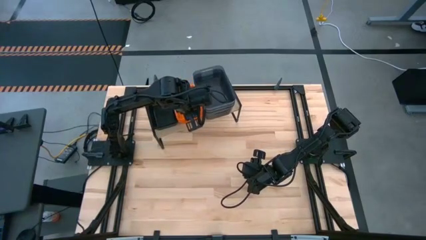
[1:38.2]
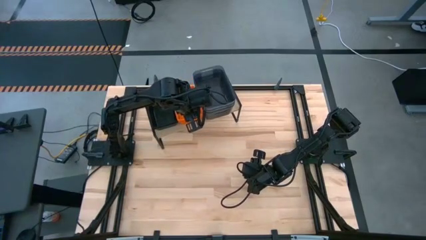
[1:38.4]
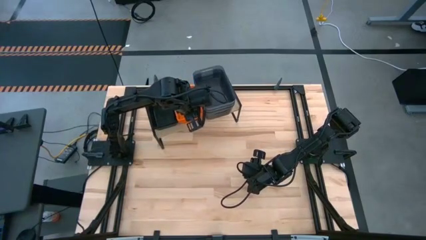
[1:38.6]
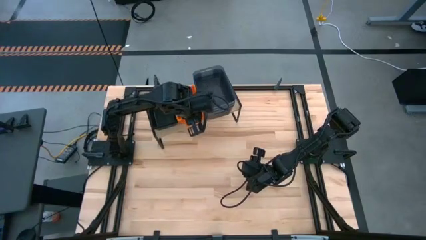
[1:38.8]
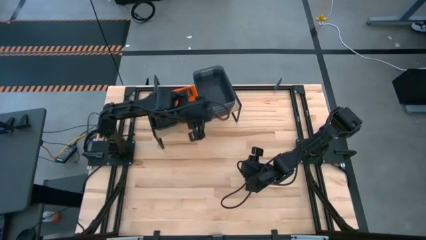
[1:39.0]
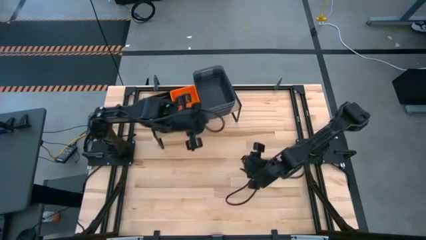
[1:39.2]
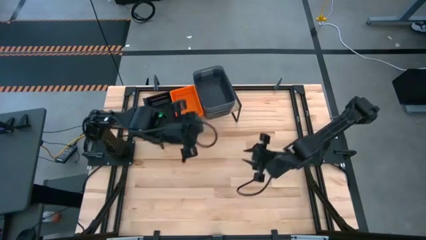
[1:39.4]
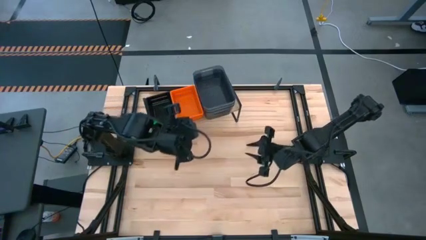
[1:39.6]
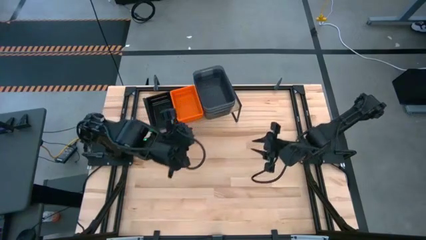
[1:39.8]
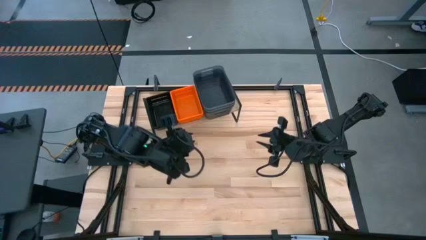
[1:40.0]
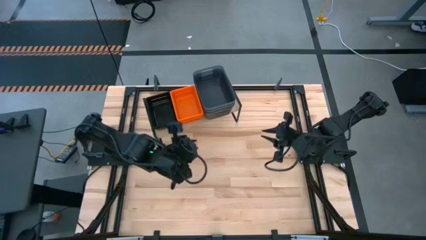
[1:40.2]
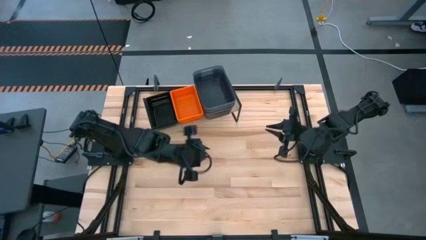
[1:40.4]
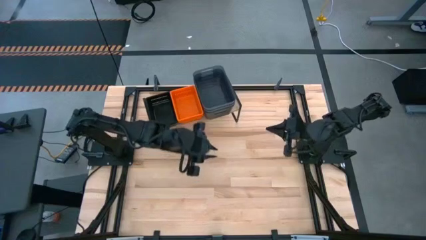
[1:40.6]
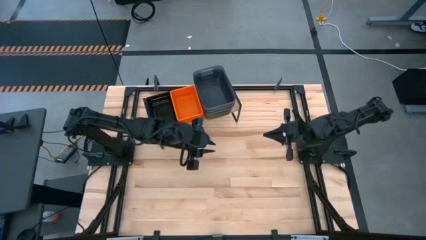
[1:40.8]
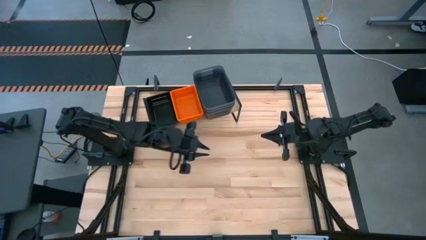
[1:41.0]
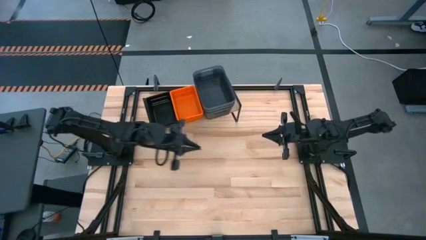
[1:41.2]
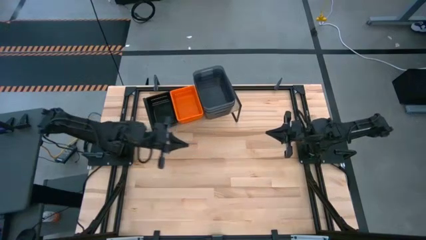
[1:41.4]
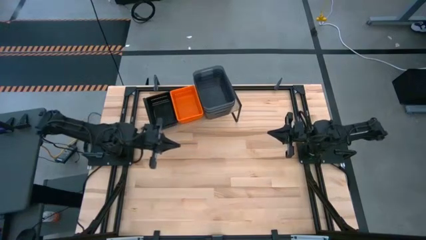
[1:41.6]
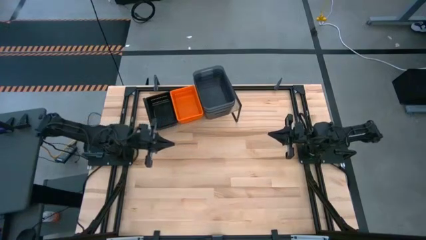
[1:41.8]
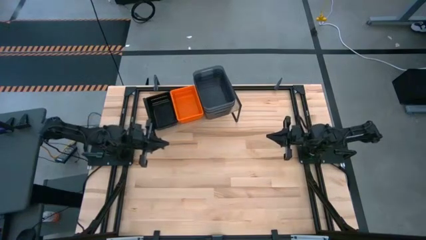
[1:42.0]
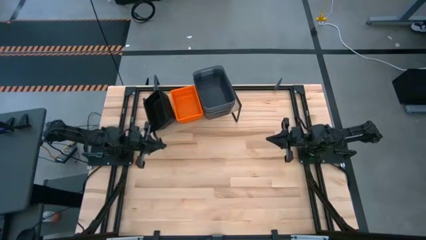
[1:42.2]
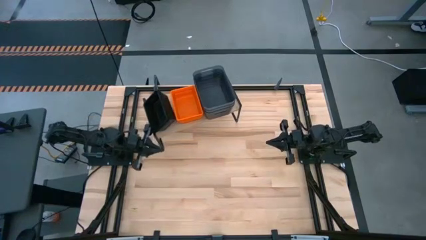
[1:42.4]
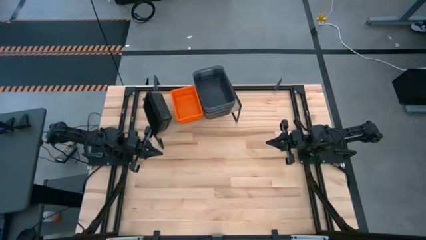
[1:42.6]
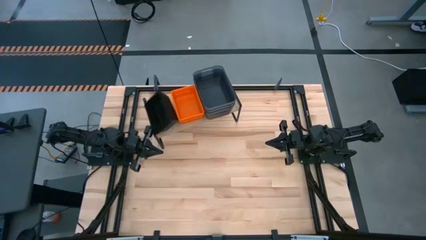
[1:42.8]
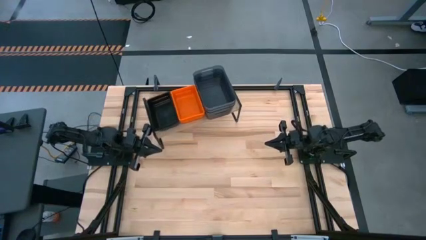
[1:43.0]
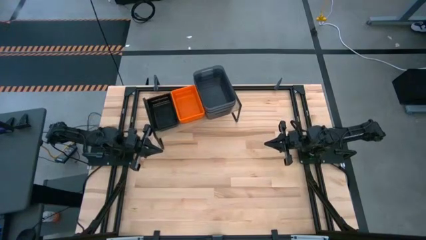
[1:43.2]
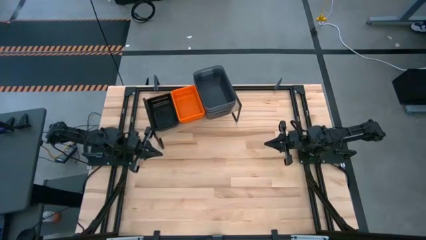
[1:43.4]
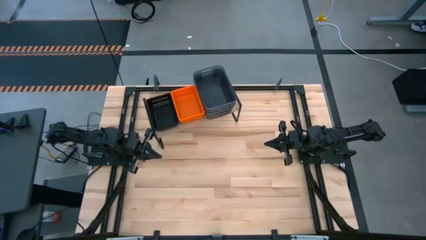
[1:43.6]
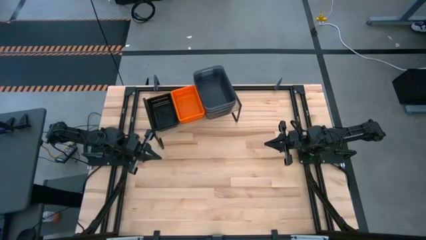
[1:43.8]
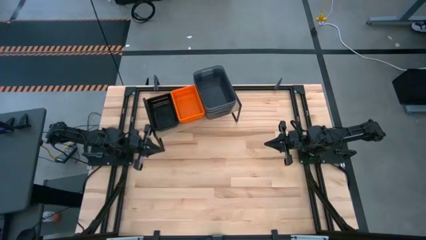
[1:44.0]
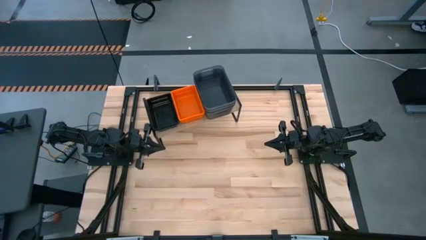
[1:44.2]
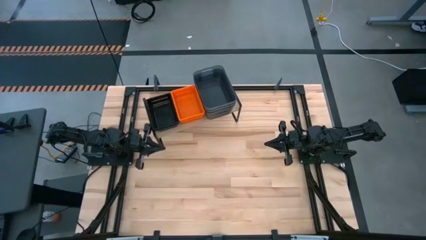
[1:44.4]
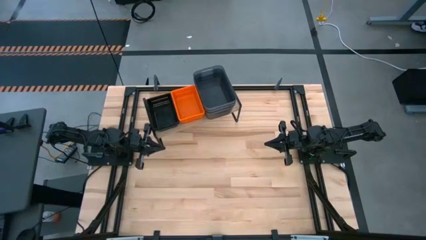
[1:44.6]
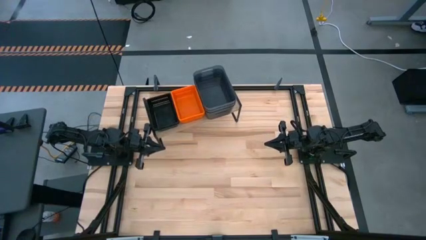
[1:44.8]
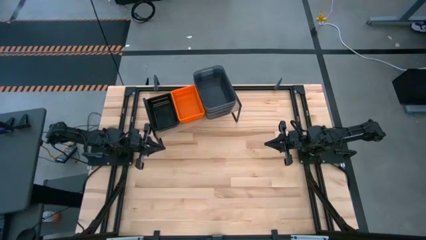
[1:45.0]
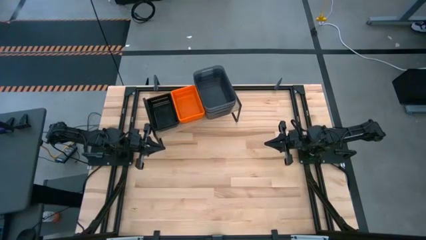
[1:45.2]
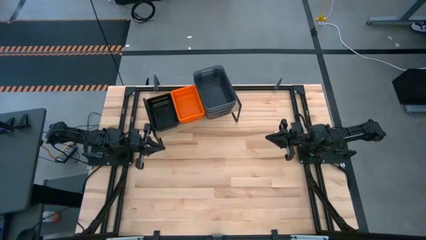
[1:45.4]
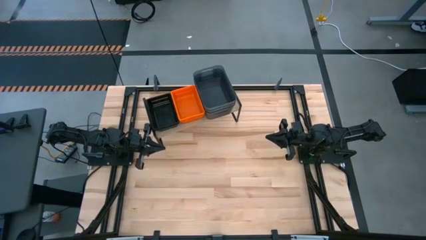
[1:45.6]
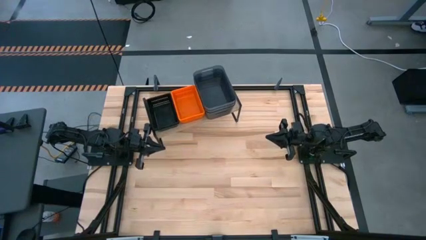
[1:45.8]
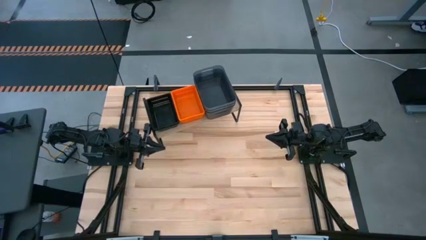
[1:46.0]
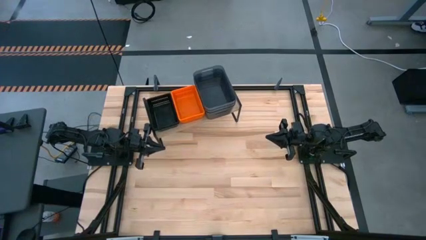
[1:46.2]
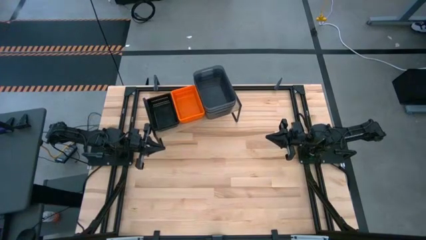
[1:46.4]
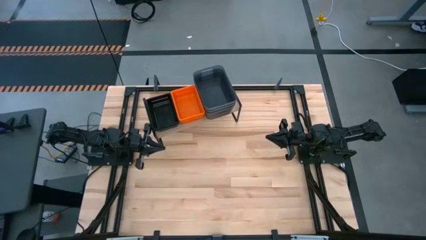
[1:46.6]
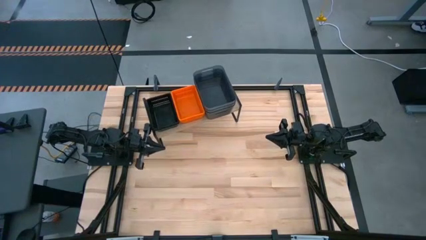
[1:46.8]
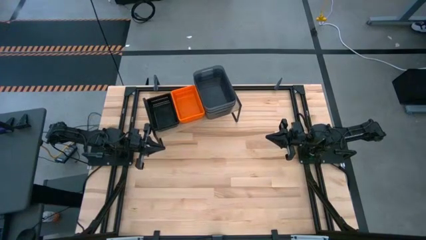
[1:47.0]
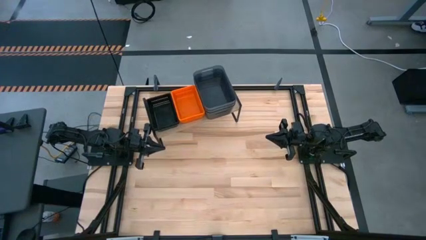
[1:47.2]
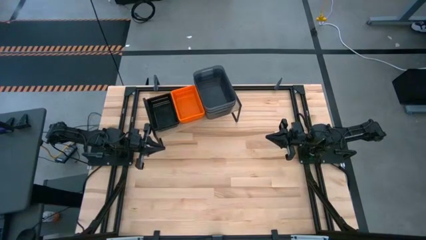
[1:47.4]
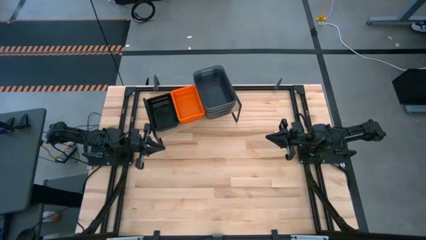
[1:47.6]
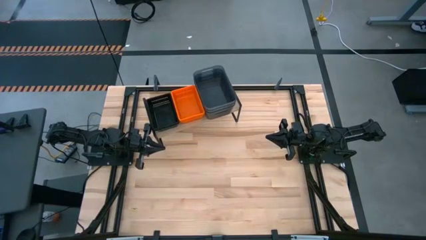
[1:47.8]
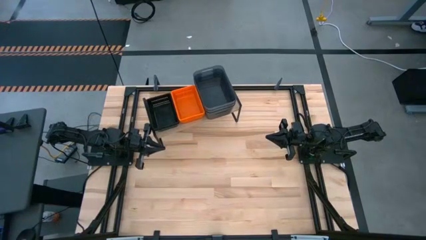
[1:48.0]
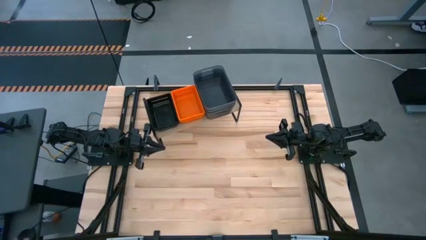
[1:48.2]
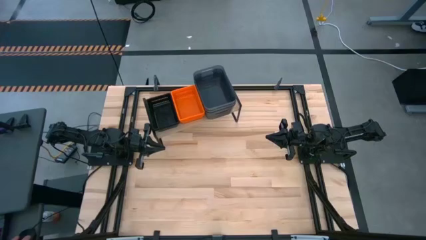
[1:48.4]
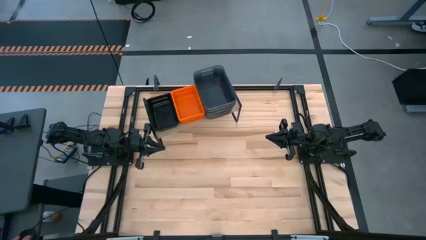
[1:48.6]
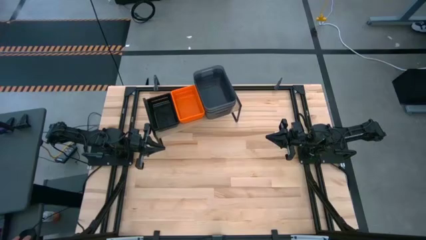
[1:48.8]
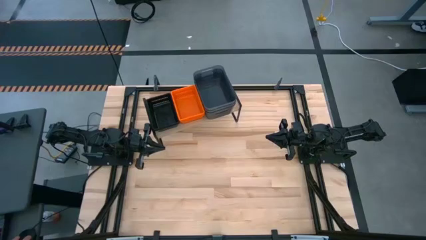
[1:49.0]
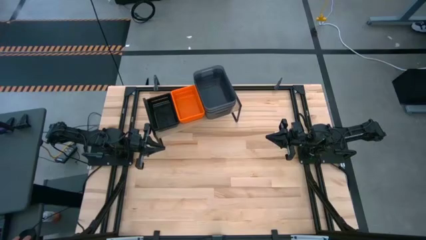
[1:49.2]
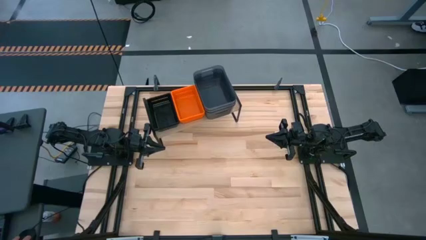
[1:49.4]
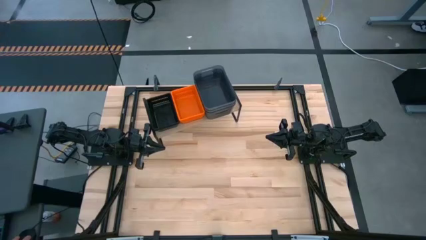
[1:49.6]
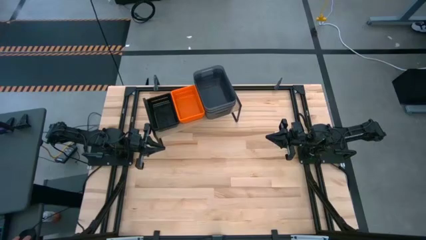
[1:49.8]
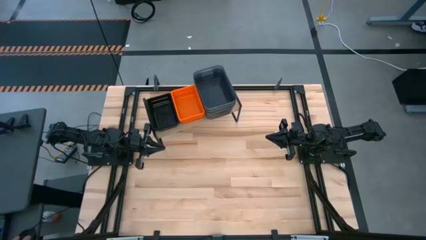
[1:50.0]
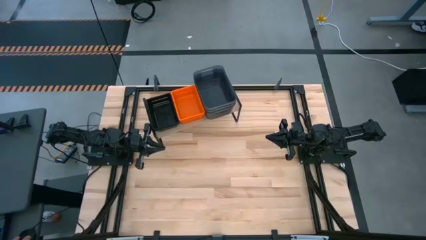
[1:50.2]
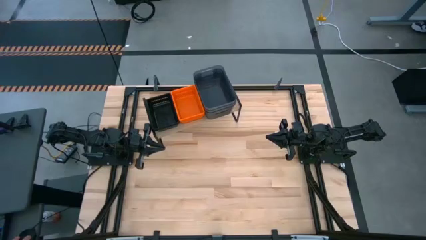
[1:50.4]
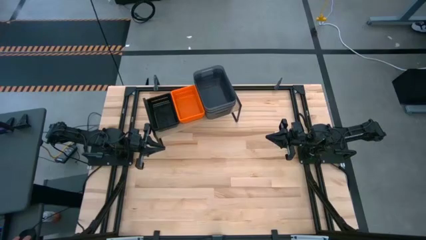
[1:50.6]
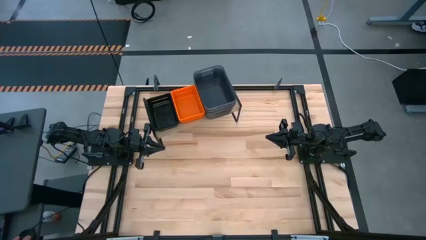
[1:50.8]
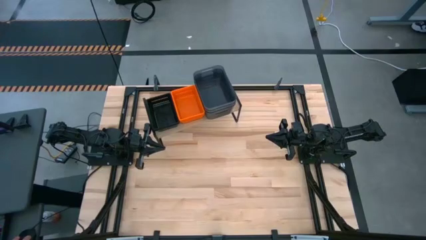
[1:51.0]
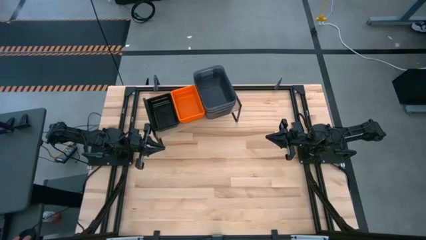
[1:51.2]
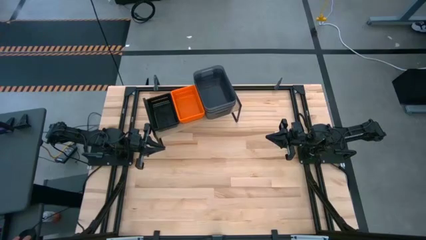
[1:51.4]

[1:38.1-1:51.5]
Task: Stack baskets on shelf by color
Return to Home Position

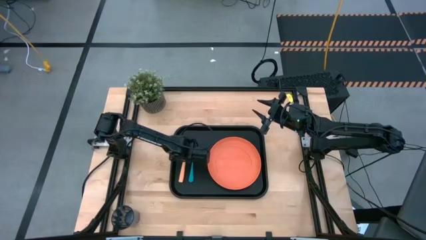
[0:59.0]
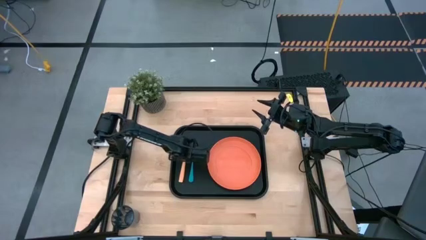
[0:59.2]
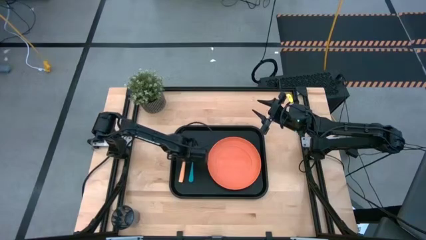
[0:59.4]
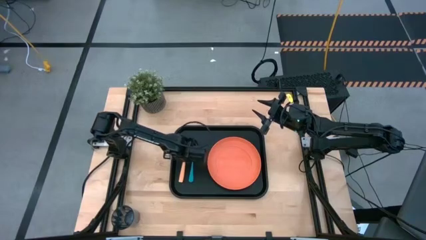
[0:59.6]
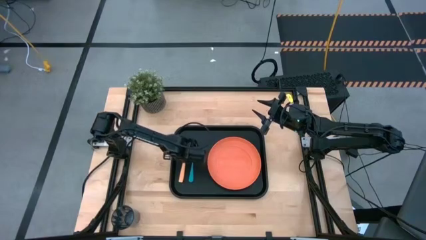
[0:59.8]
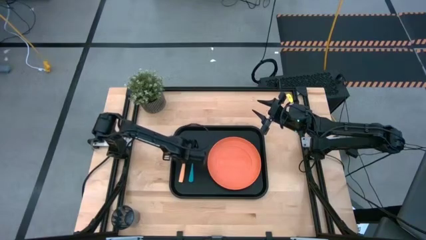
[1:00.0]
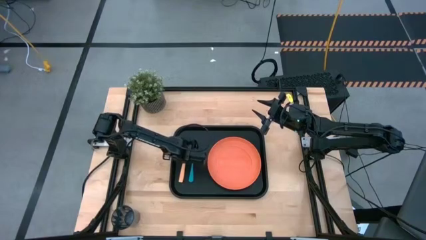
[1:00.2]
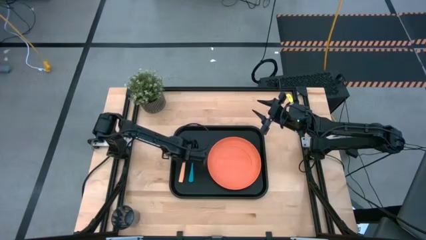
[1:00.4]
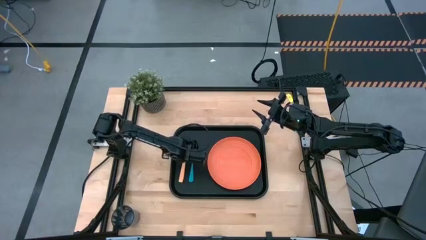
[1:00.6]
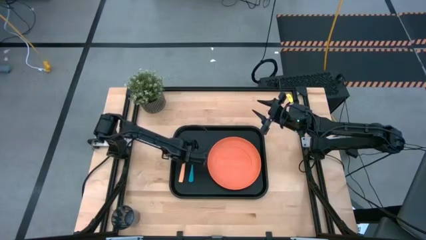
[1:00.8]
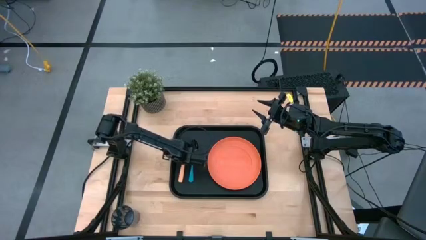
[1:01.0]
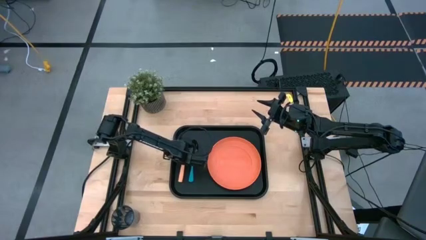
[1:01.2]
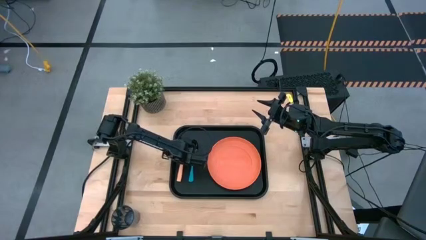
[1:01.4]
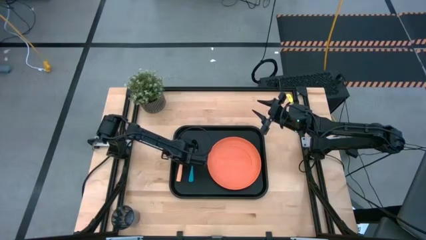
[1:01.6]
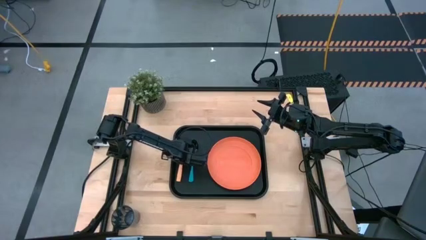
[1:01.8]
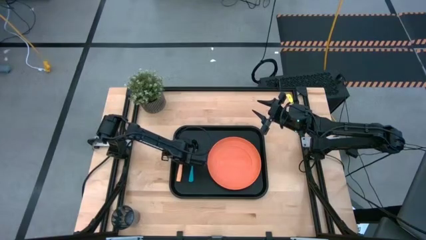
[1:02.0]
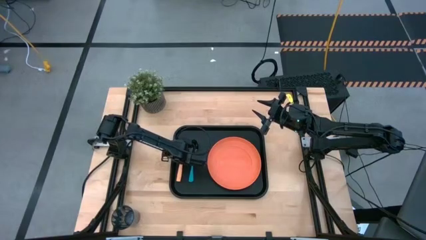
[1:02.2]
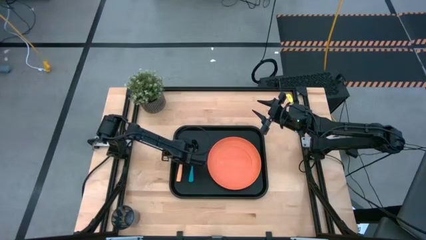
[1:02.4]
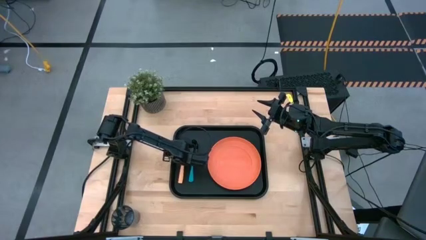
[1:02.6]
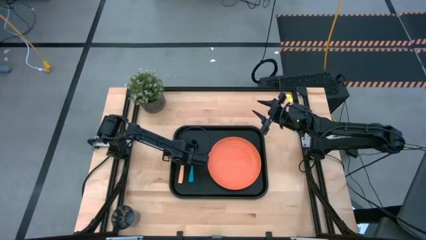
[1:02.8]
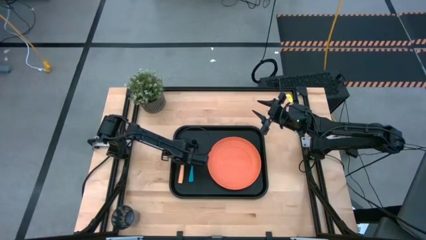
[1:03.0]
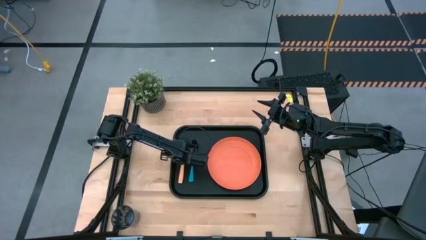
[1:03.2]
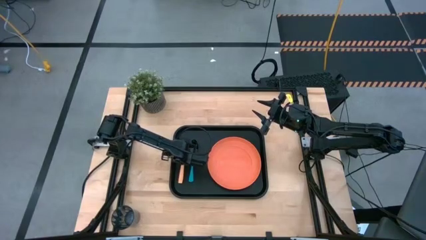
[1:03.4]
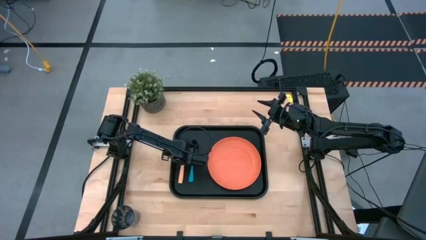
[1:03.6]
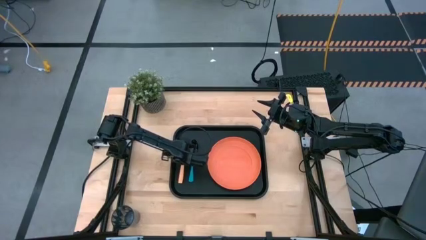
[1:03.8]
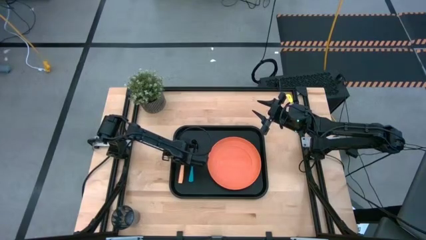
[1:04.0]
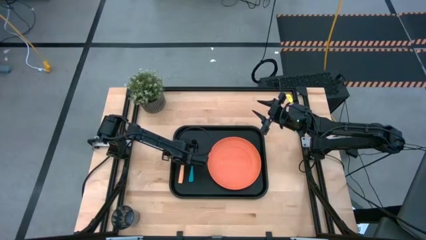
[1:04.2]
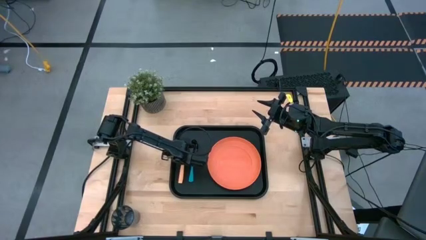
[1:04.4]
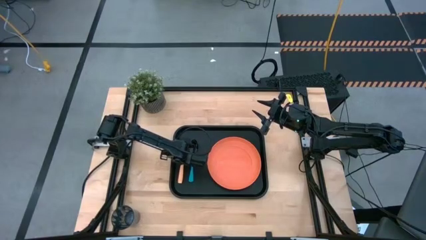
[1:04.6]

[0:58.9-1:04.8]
Task: Pick and place plate/cup/fork/spoon on tray
Adjust the orange fork
